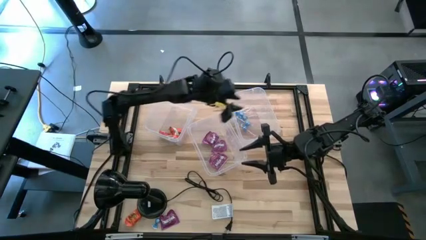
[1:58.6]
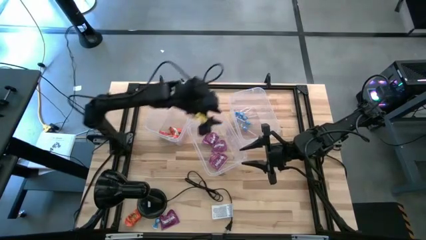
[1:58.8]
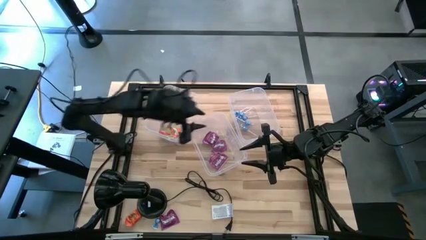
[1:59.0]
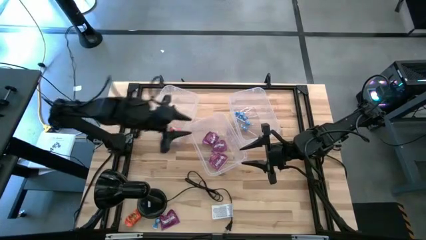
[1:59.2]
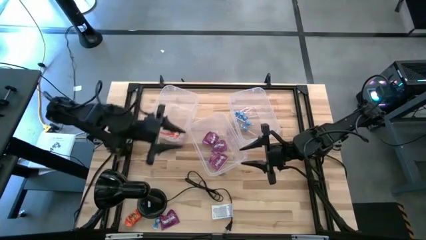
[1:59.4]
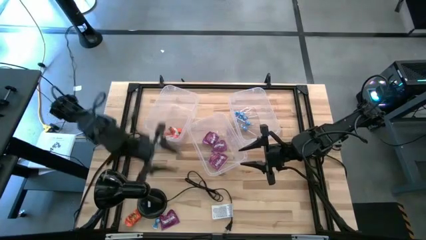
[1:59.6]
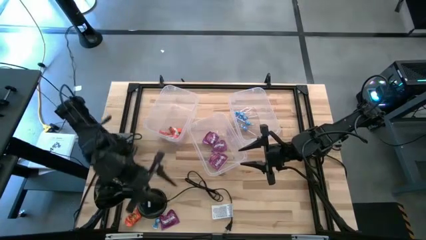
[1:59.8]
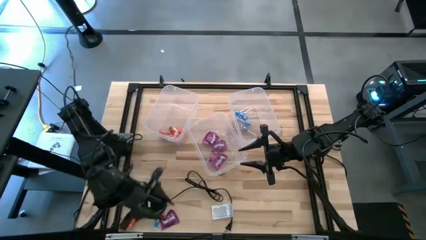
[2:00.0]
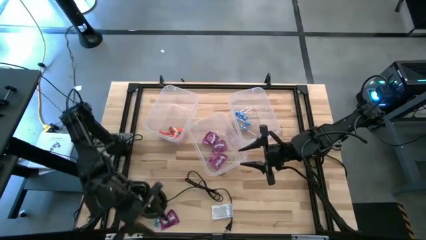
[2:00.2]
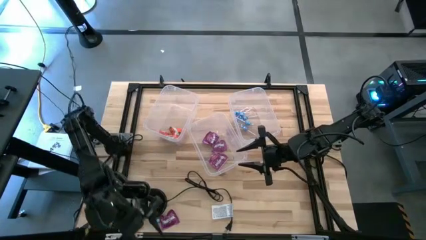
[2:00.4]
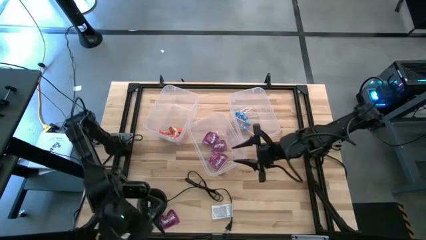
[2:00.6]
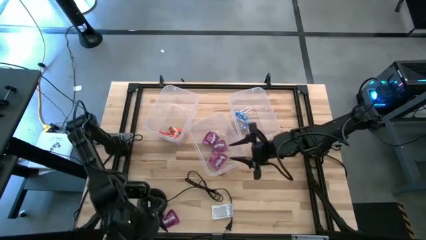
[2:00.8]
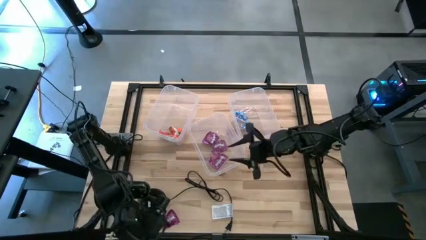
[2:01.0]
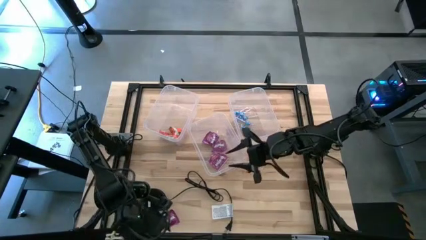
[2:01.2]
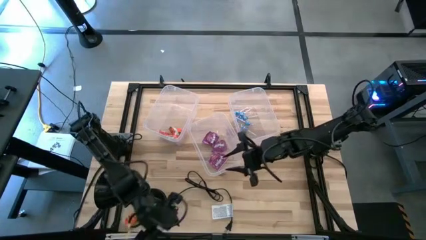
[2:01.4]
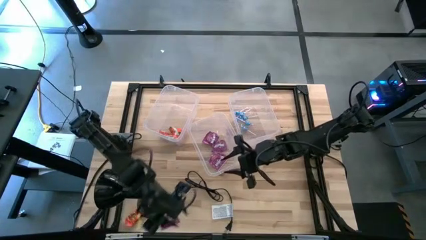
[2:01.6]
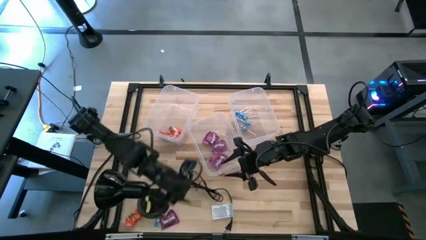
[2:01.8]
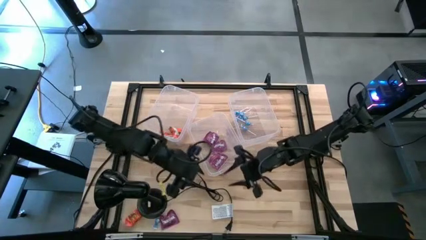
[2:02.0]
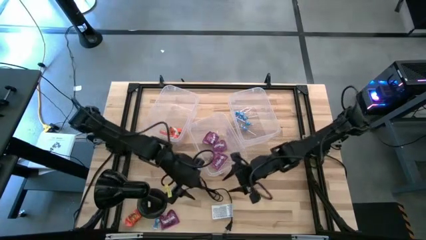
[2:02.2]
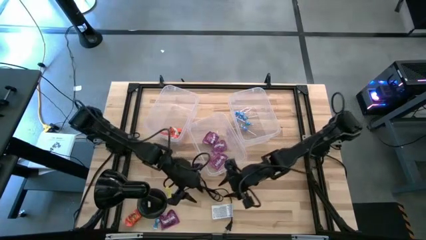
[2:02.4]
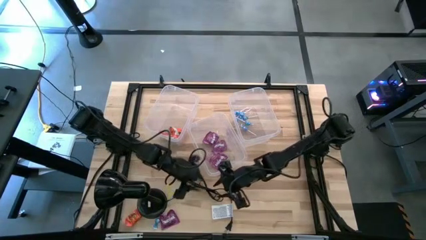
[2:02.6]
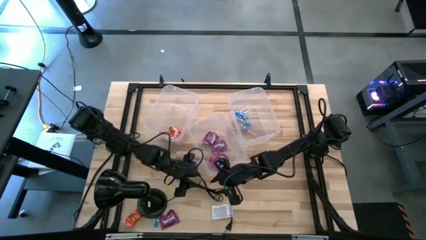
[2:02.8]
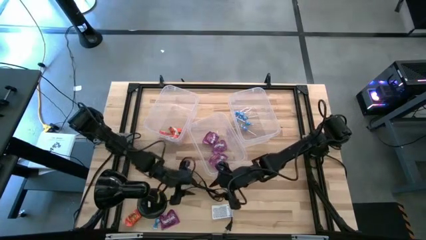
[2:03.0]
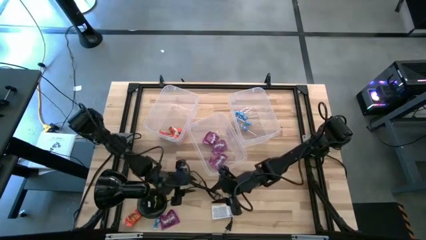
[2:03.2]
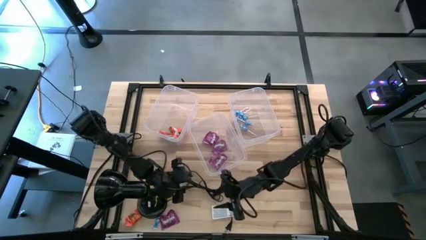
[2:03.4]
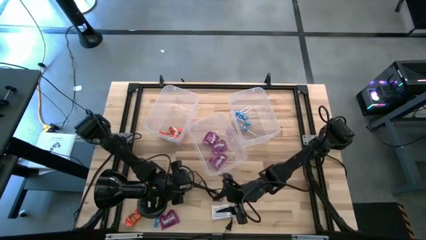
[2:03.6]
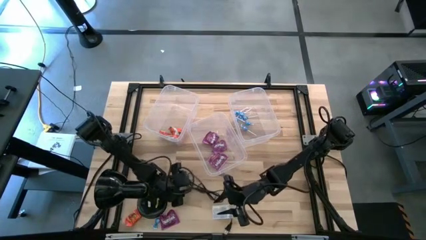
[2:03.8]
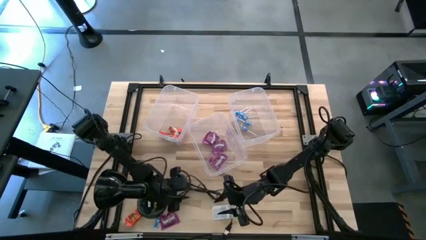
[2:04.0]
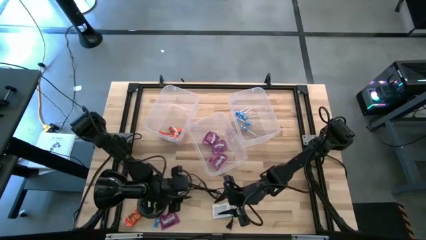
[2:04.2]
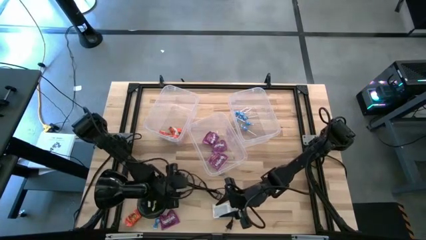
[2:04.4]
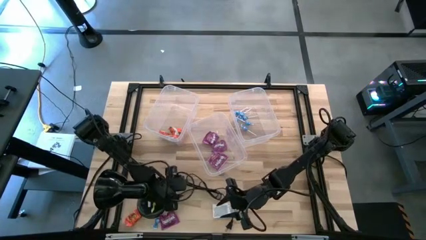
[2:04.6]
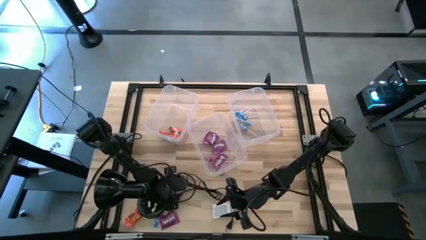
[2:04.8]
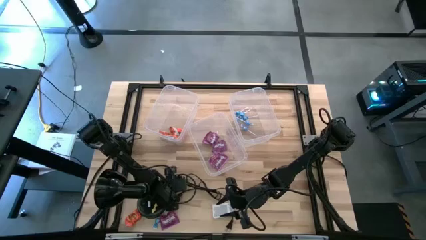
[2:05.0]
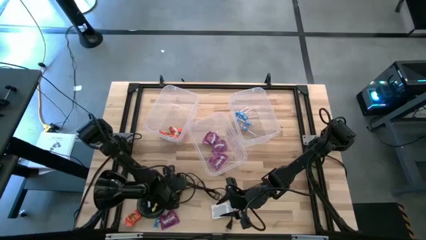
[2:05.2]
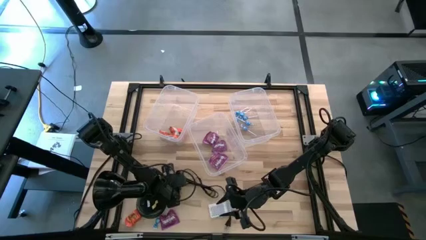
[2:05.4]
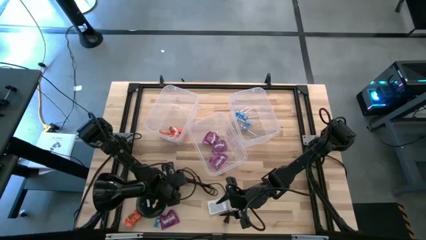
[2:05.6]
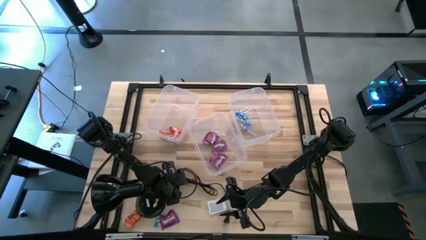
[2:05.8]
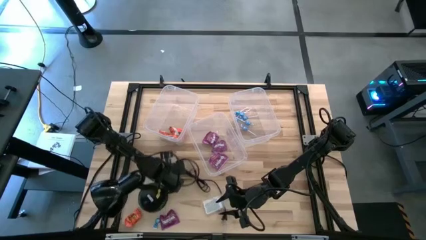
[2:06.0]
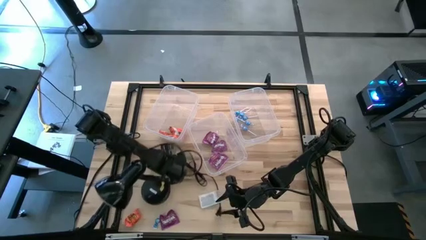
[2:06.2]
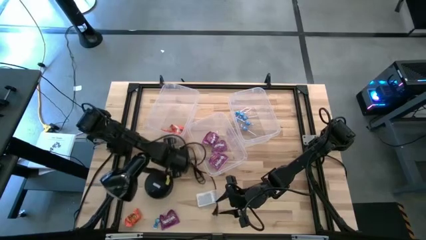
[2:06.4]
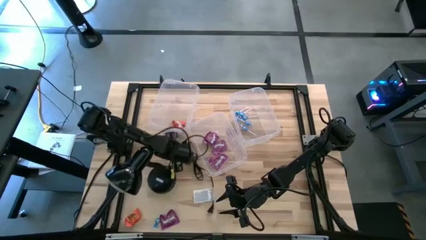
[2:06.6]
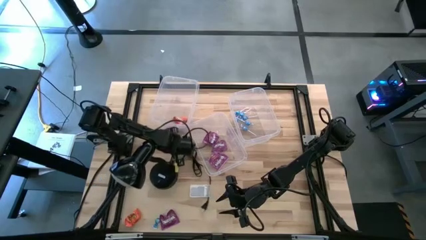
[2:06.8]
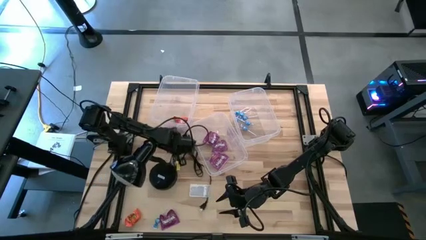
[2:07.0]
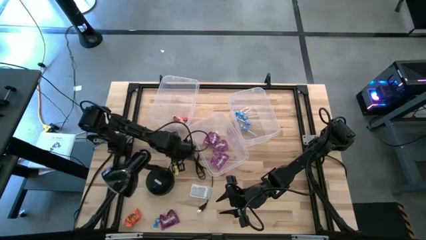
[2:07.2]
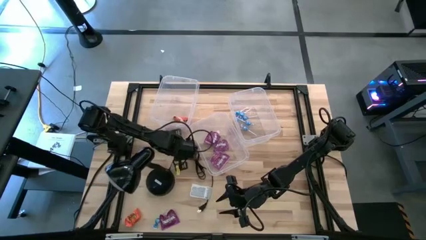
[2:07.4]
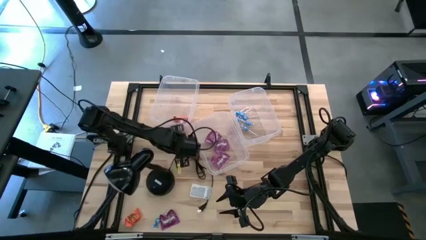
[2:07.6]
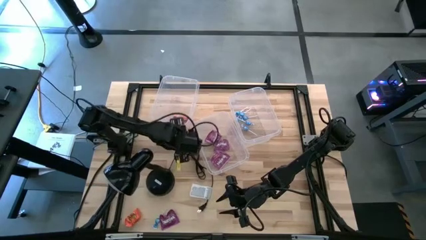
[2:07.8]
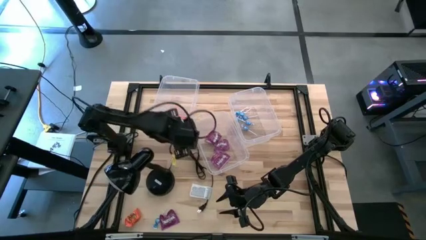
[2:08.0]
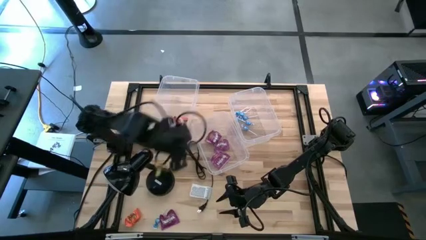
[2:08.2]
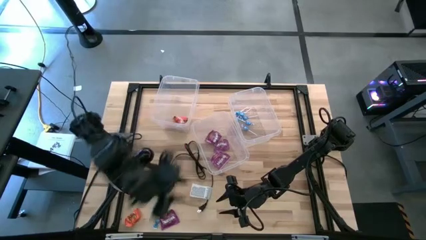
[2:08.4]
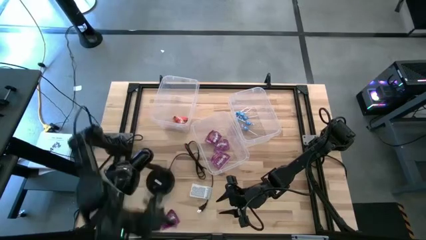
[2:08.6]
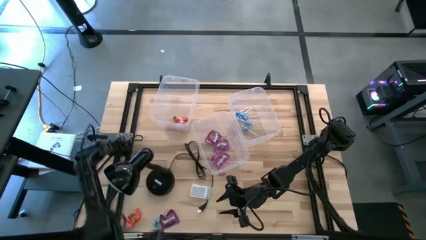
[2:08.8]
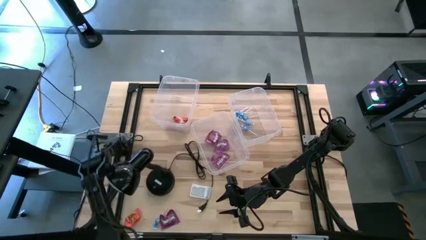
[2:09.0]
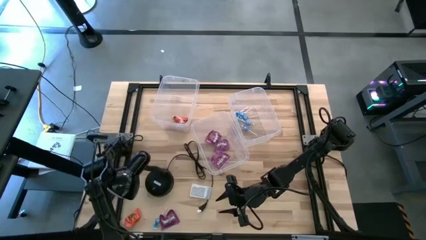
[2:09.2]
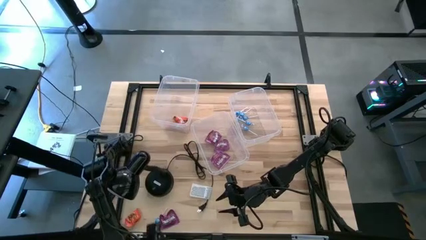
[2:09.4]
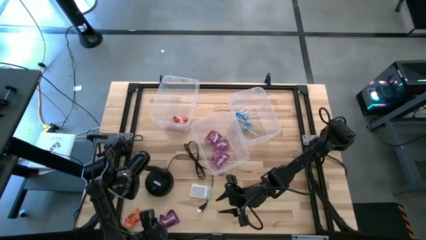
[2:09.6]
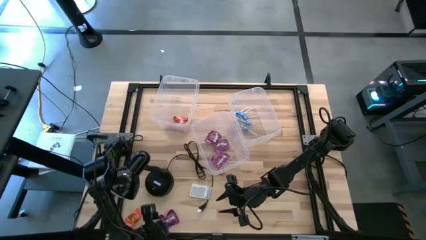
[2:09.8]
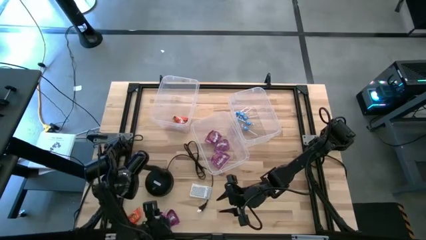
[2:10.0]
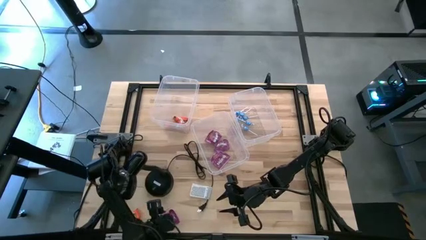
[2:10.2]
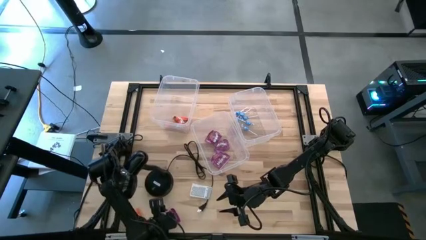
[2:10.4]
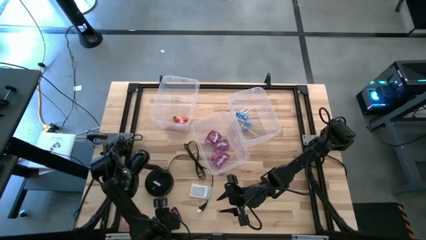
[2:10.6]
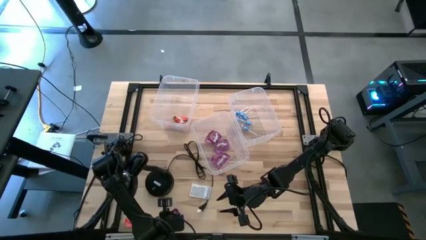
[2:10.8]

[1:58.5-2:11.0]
Task: Sort candy
Put the violet candy into the center transparent bin

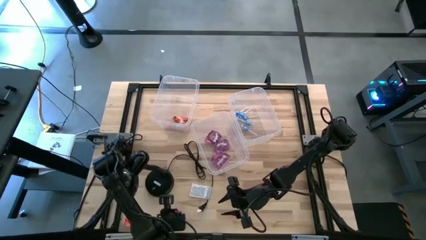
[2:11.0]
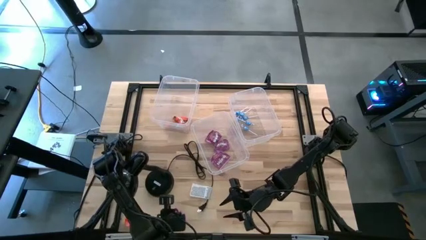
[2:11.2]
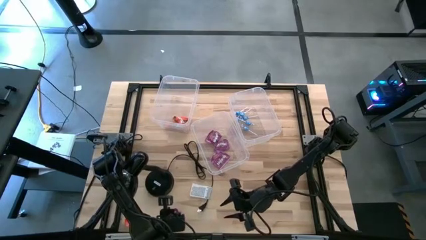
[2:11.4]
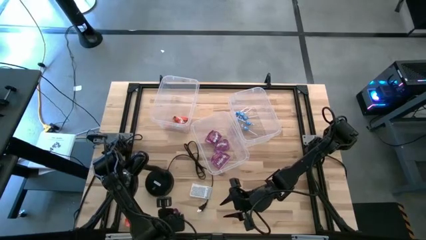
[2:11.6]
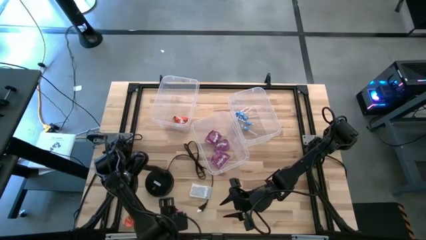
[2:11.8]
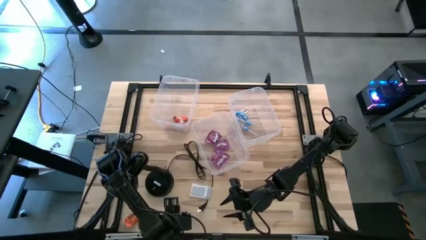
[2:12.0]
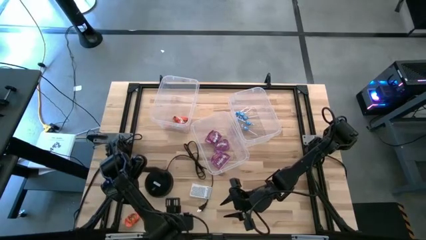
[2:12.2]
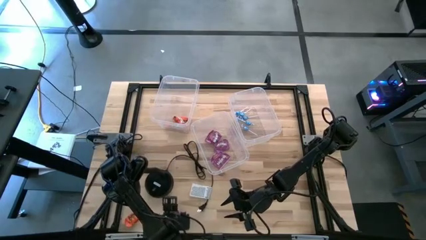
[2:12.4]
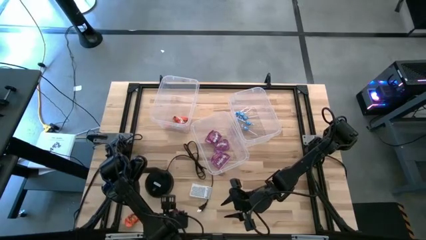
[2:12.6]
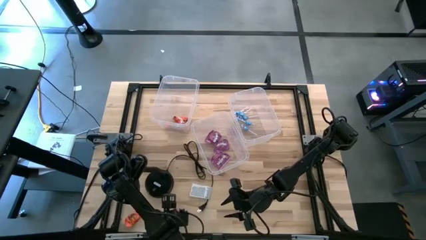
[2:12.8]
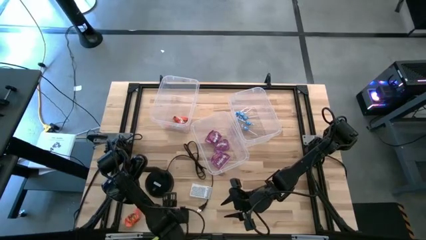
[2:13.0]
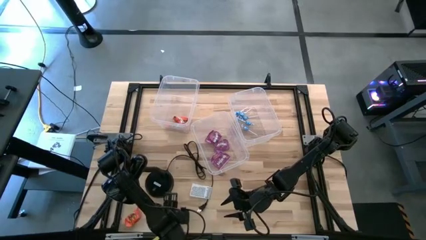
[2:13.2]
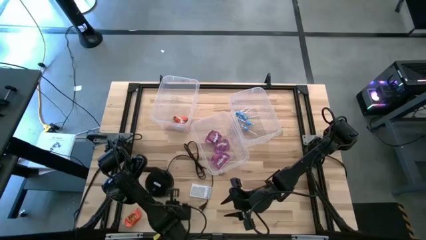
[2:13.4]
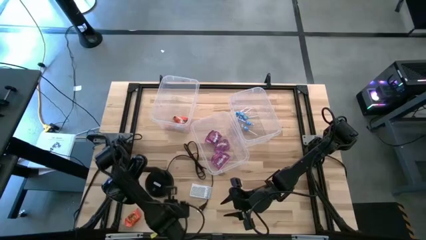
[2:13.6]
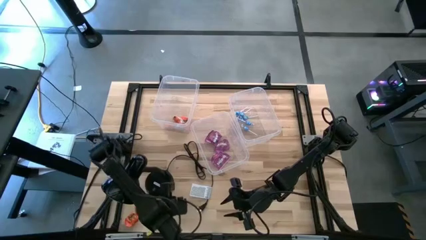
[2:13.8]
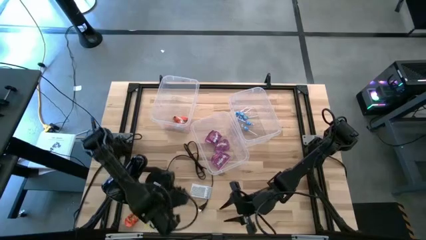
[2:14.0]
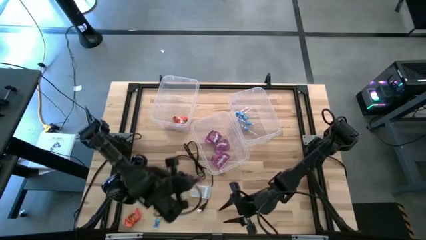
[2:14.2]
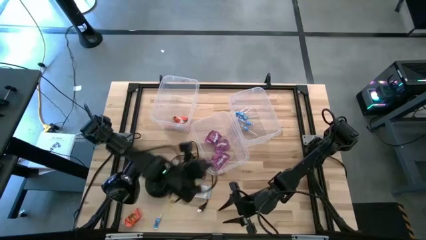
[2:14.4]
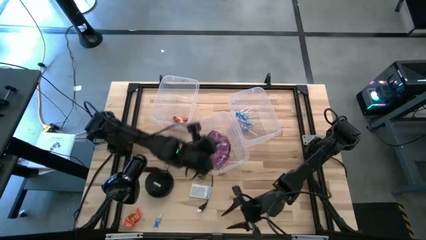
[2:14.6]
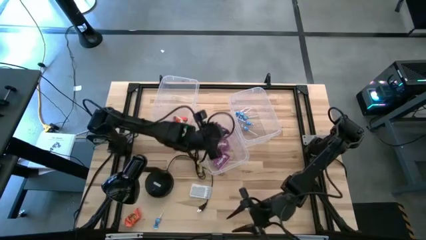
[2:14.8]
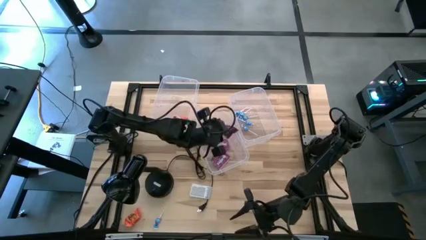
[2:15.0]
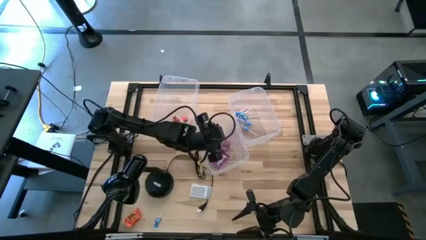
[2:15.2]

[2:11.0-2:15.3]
Put the violet candy into the center transparent bin
